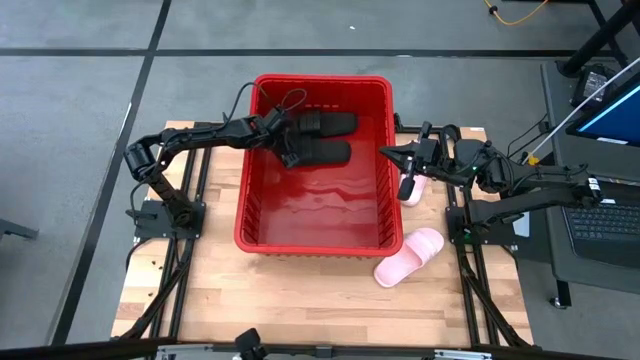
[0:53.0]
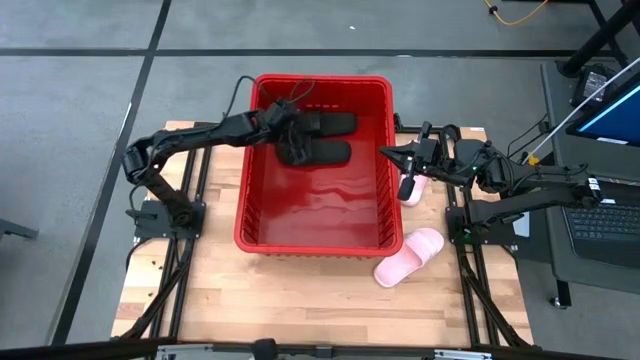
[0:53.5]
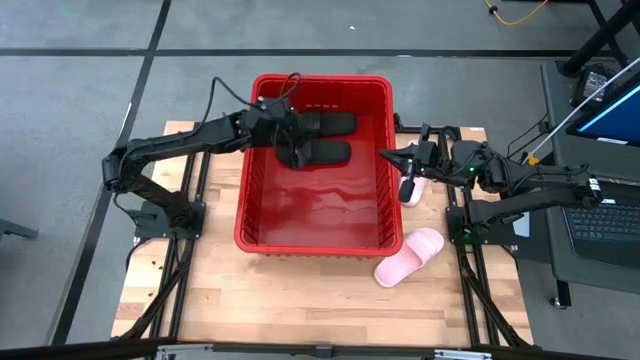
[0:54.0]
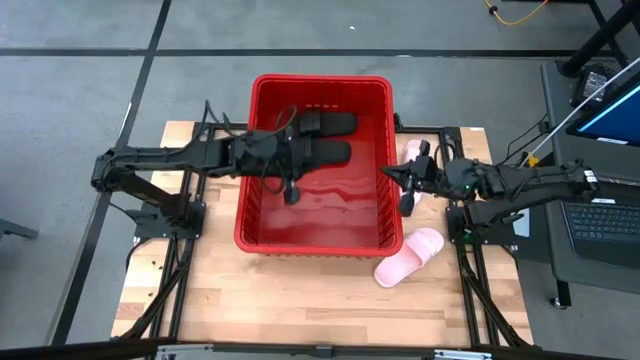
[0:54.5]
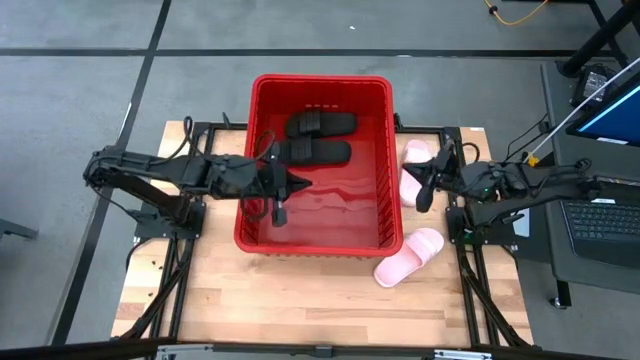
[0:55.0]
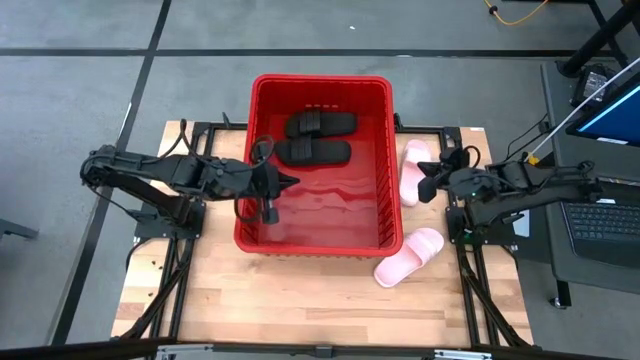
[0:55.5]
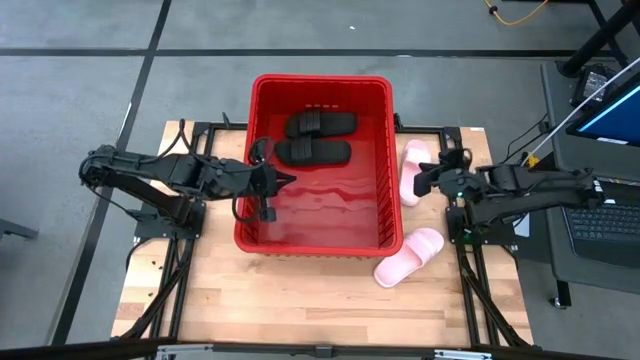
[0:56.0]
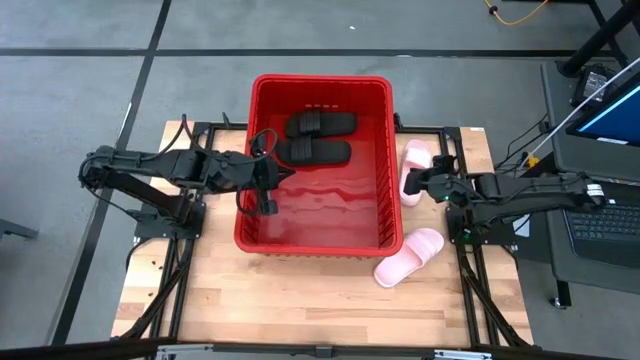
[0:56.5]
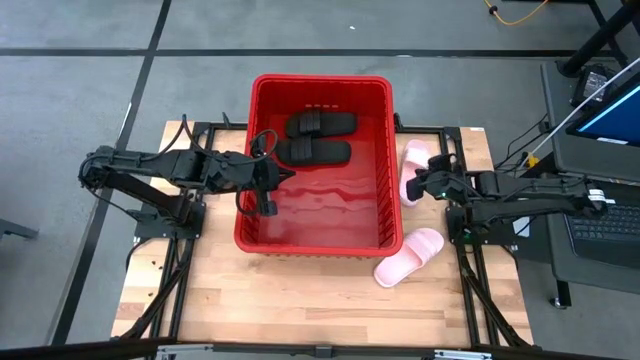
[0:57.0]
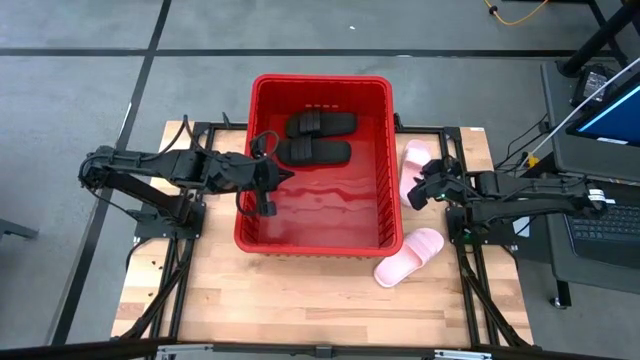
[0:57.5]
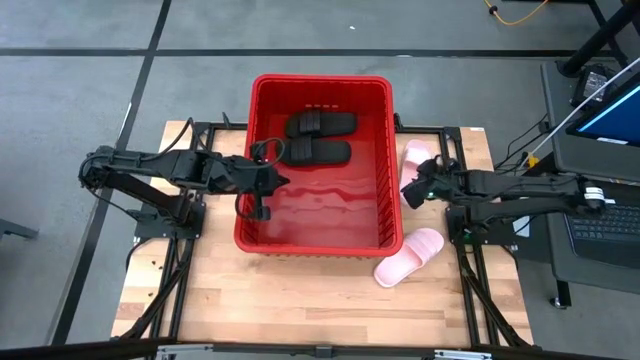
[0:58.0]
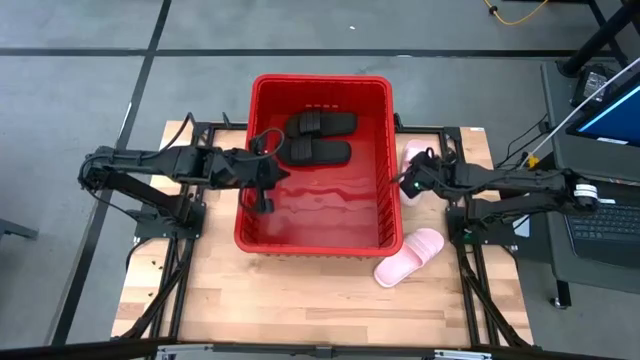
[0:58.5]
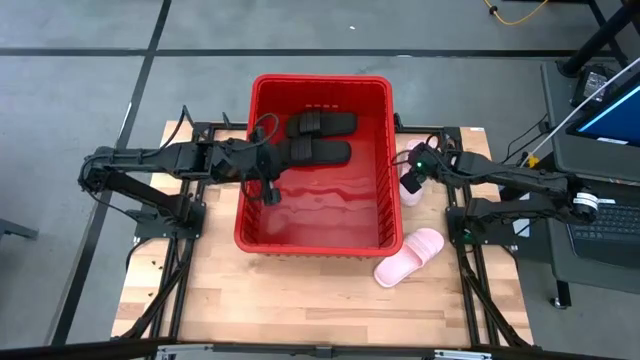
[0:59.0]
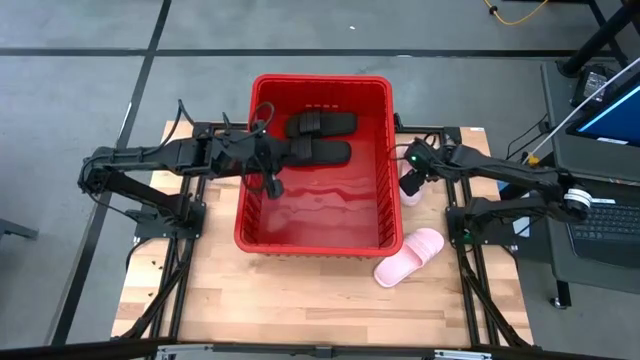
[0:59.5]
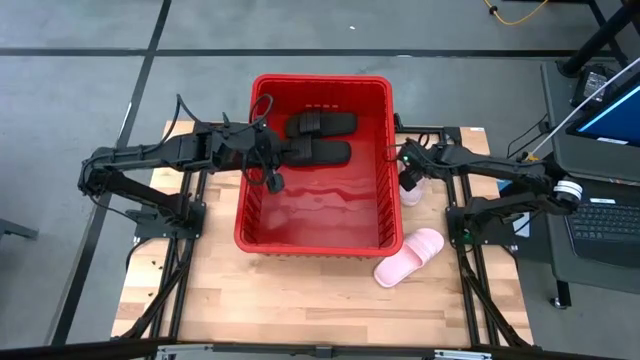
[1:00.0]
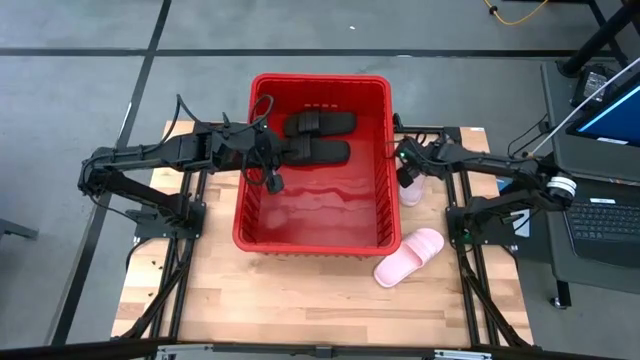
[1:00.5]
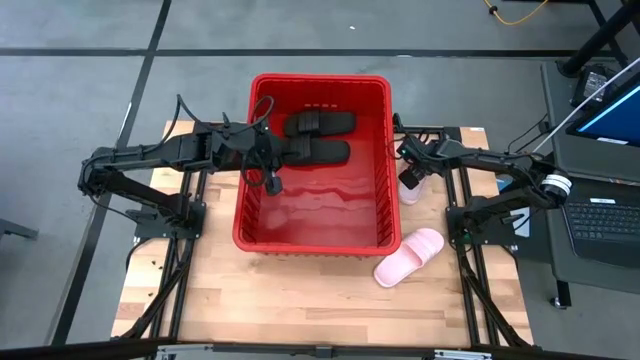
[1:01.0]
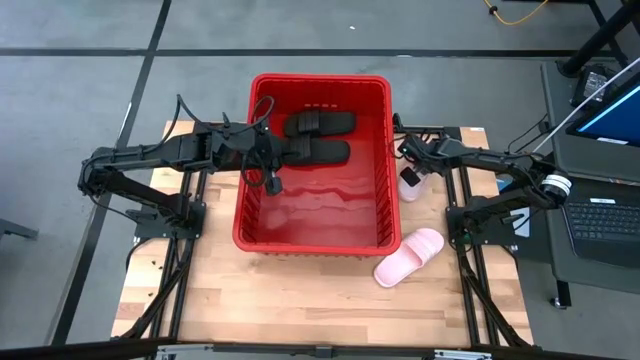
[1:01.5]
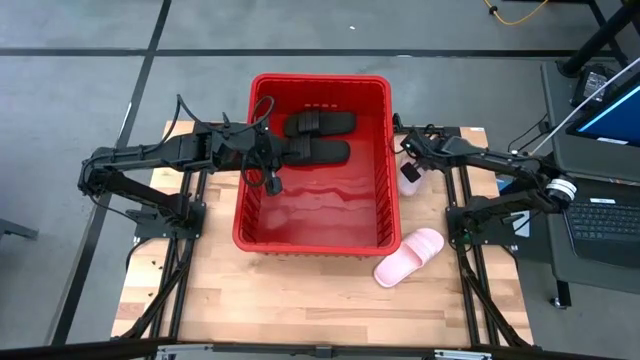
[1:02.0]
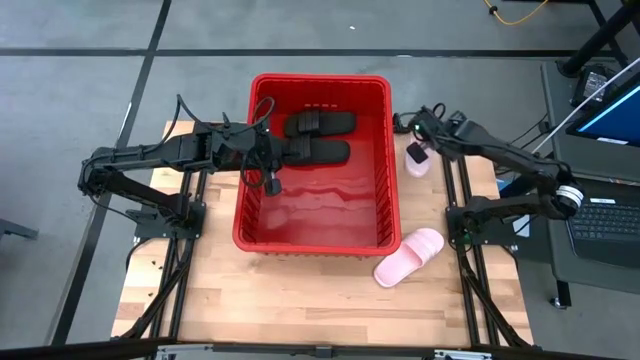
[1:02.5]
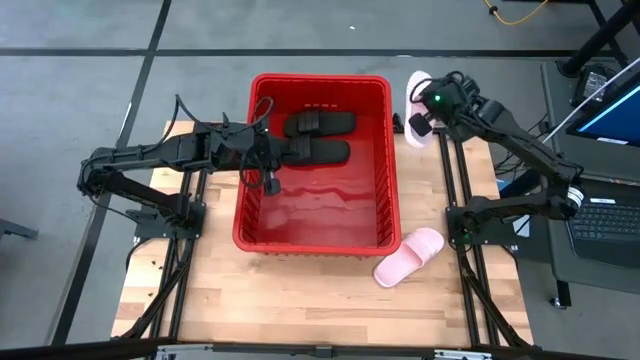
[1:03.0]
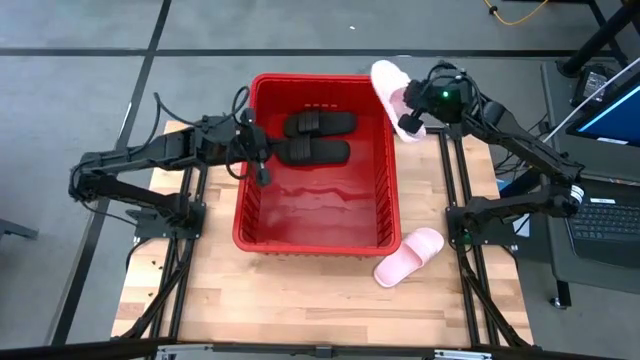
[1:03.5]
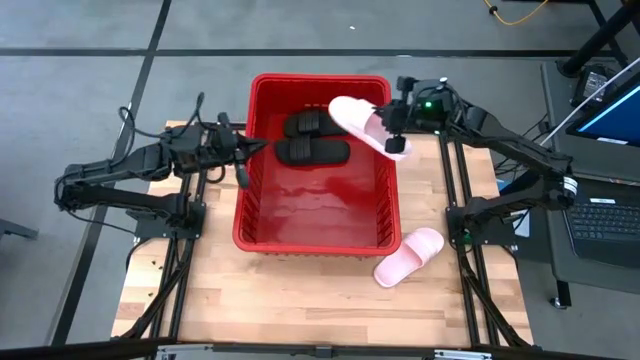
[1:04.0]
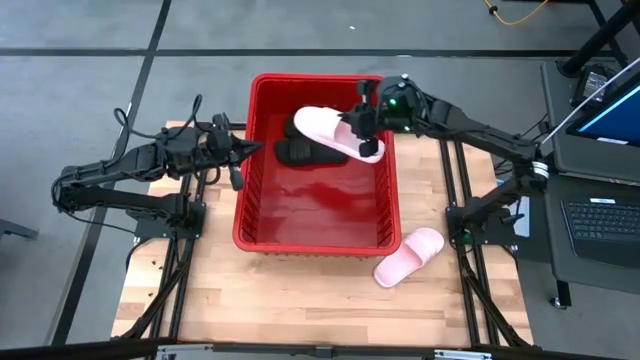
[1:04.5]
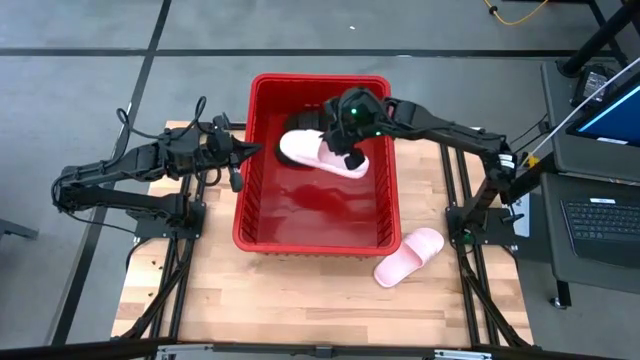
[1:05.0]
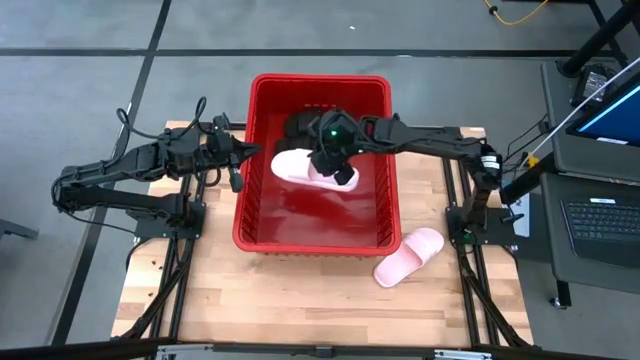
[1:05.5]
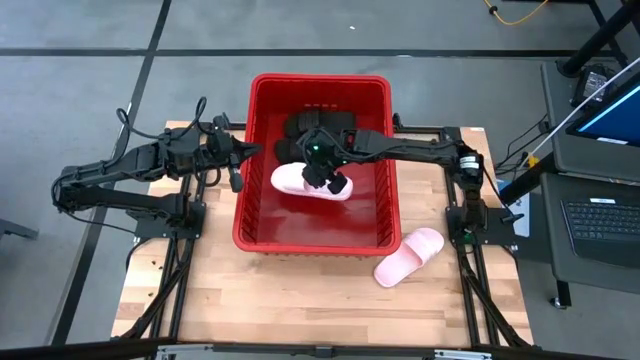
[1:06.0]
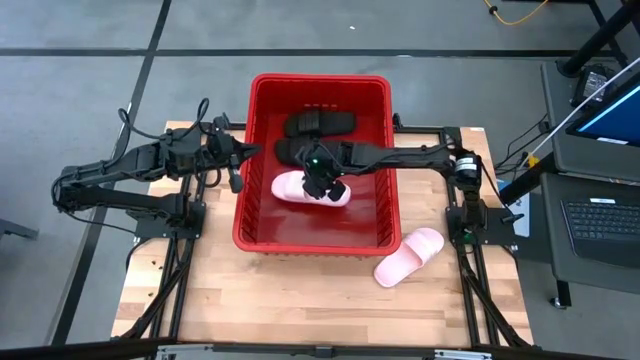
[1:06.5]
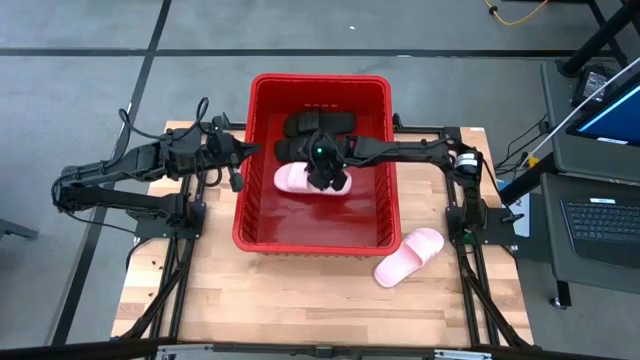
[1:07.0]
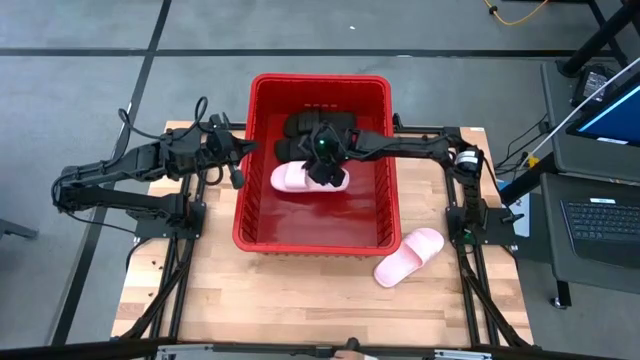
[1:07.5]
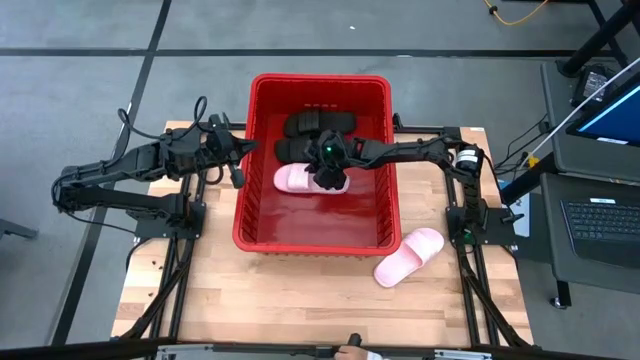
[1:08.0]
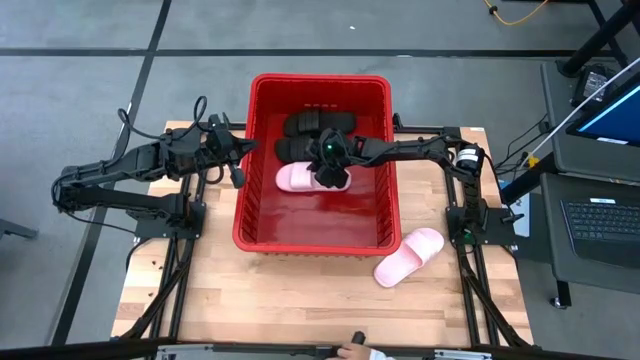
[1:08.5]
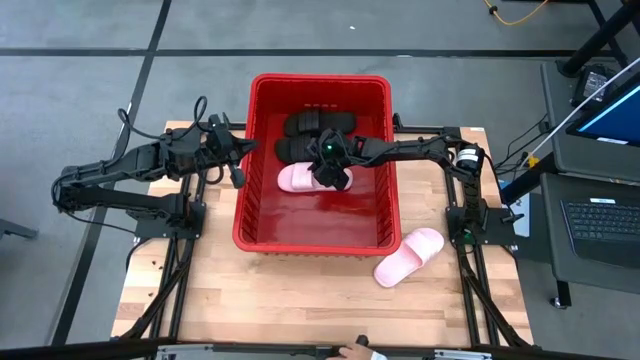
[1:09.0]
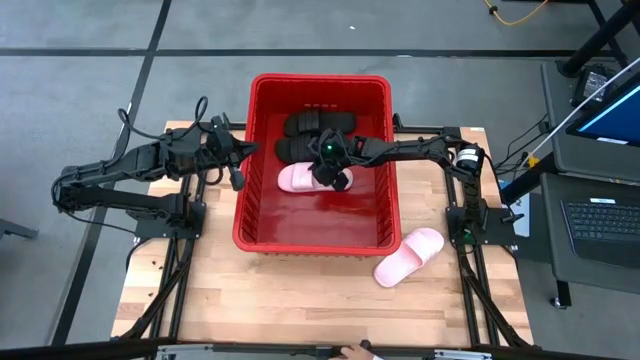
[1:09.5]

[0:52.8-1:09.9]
Task: Pick and place slides into bin
Put the top pink slide into the red bin

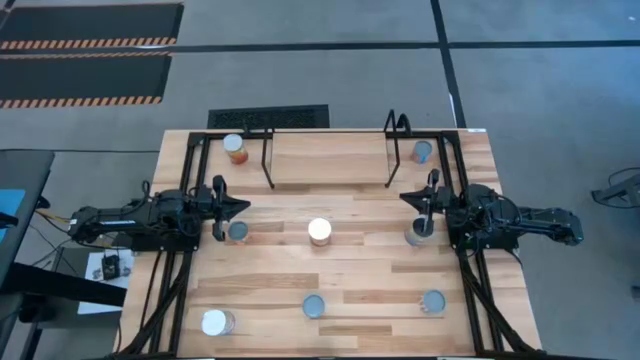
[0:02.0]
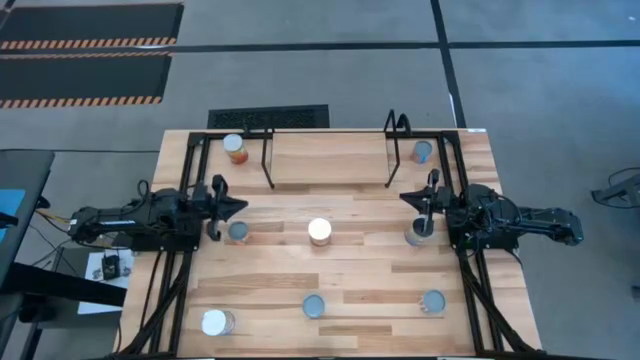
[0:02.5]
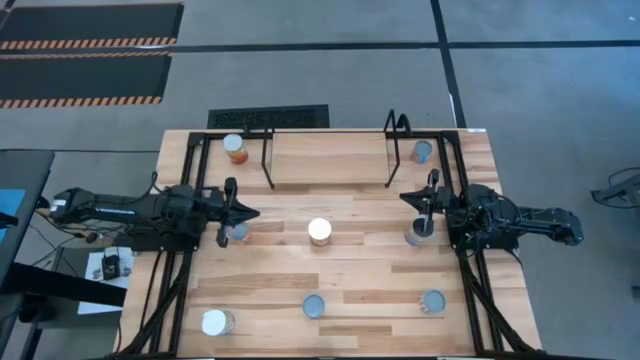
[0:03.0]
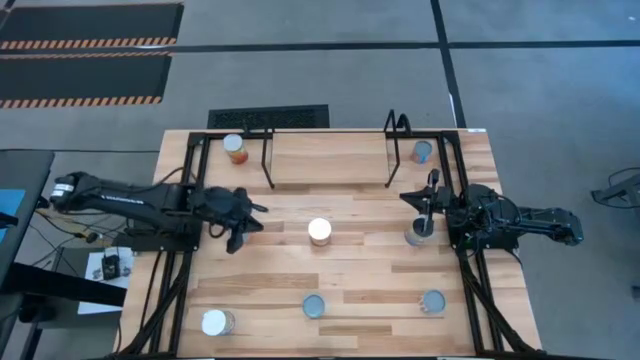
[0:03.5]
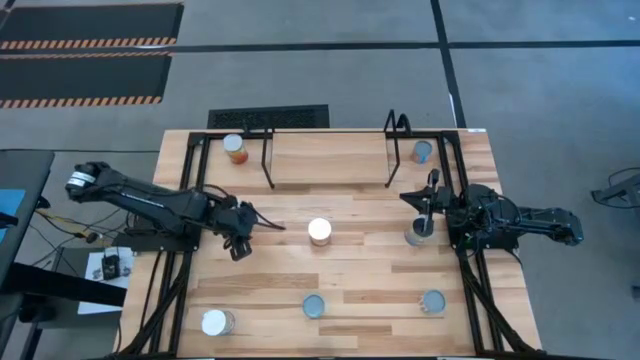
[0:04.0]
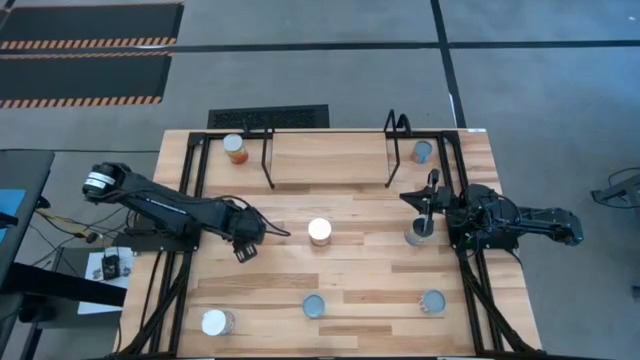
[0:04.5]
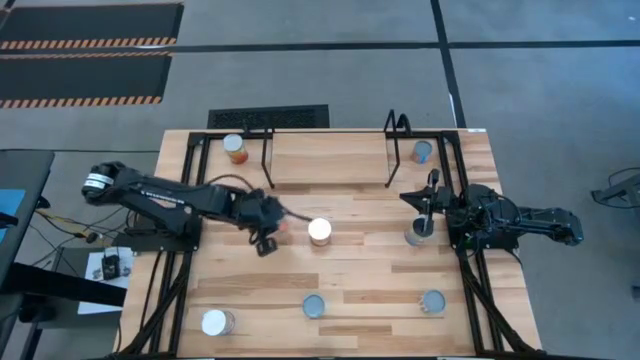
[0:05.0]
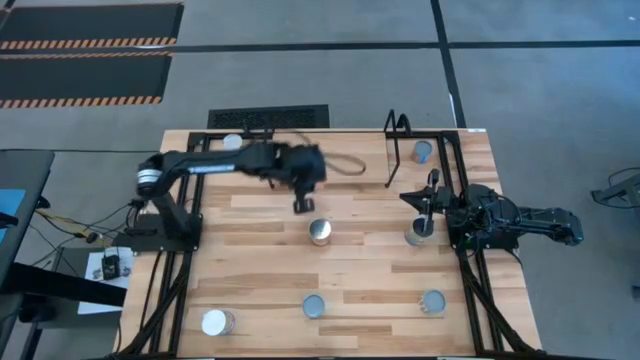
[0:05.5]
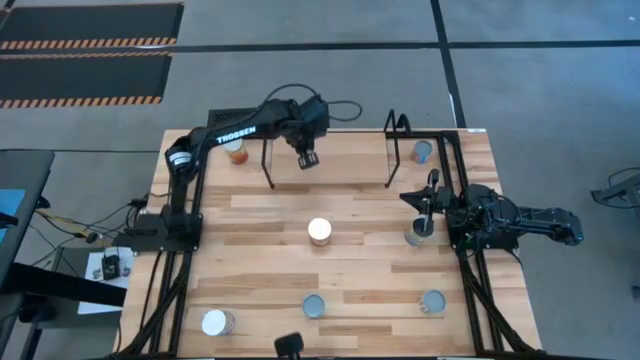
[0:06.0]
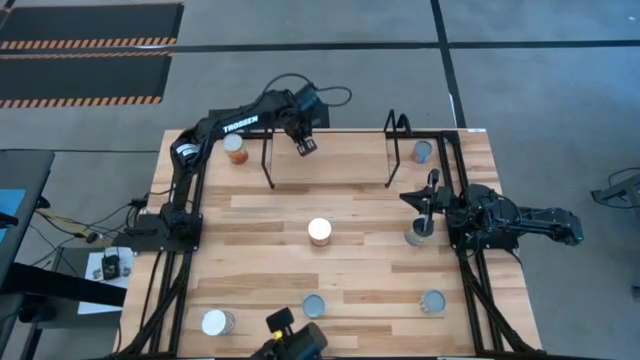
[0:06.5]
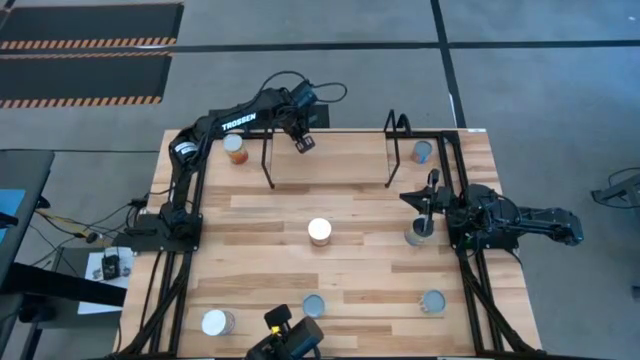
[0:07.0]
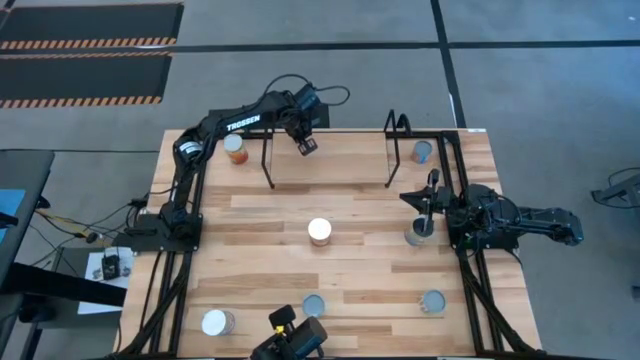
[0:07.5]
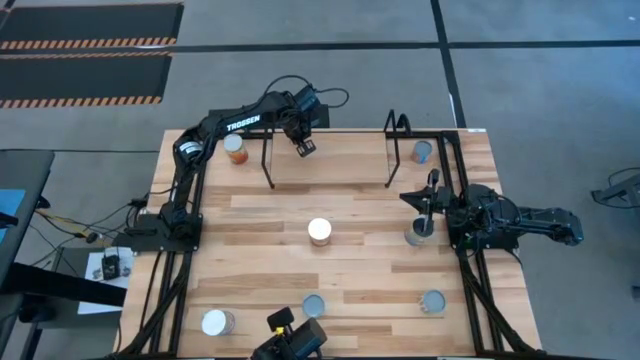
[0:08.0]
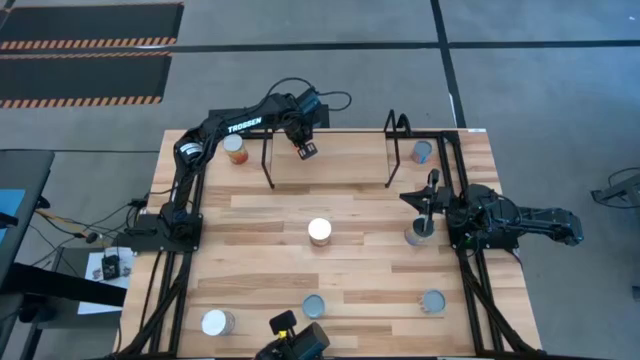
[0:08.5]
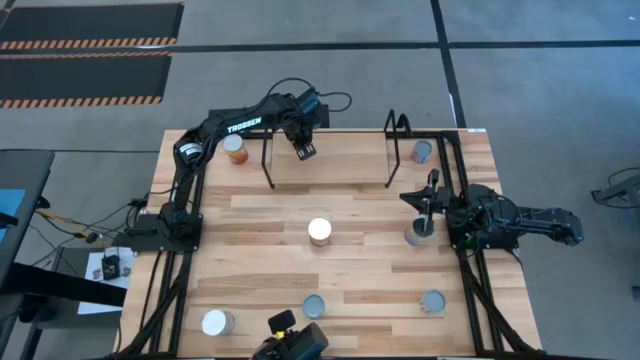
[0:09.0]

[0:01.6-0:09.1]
Task: Pick and place cans onto a shelf
Put the canned oranges on the shelf
